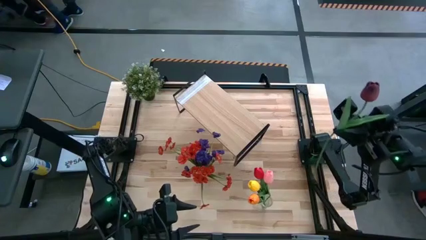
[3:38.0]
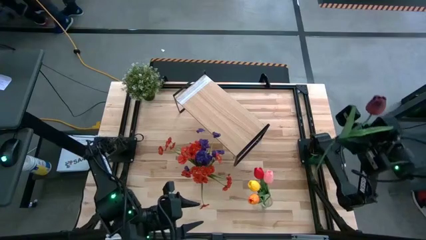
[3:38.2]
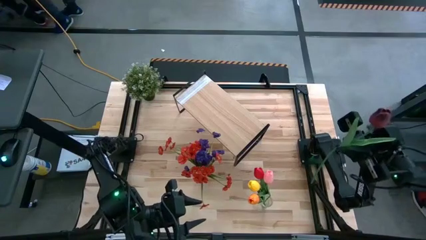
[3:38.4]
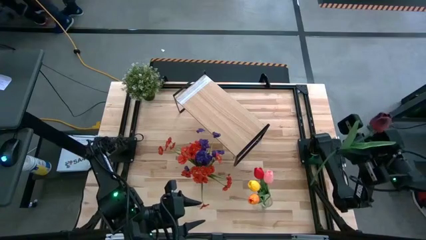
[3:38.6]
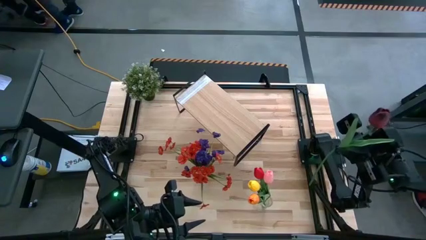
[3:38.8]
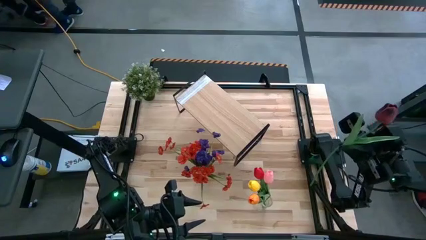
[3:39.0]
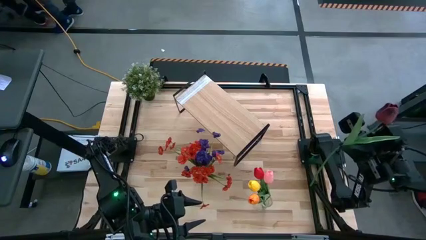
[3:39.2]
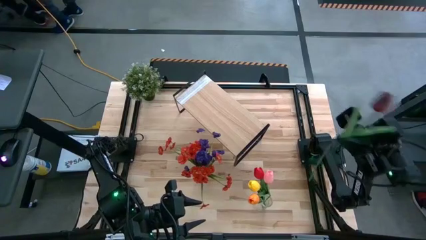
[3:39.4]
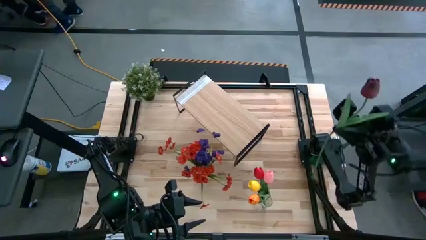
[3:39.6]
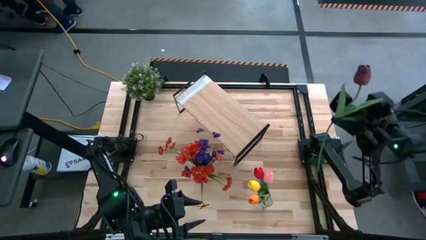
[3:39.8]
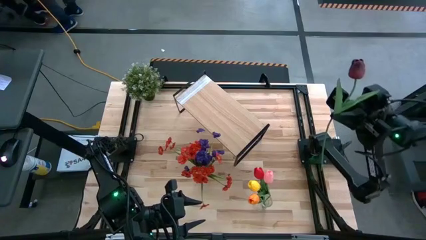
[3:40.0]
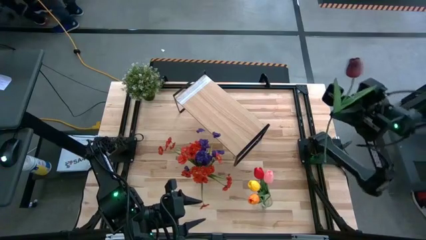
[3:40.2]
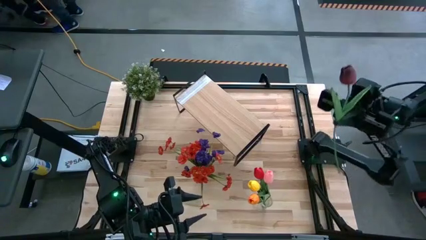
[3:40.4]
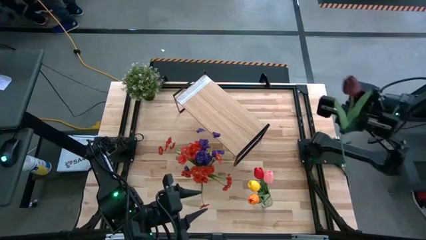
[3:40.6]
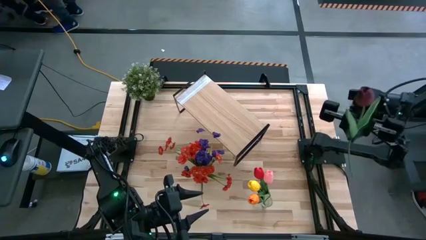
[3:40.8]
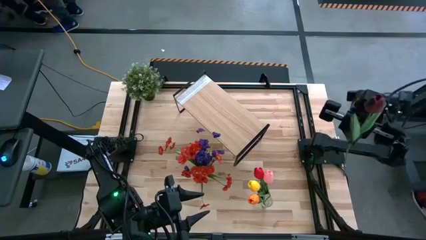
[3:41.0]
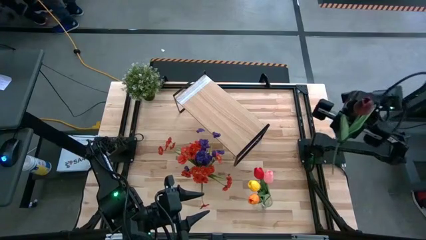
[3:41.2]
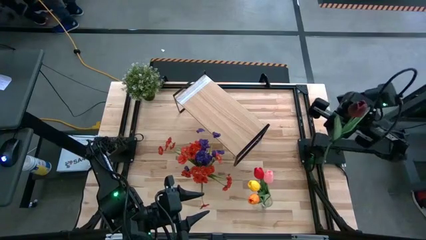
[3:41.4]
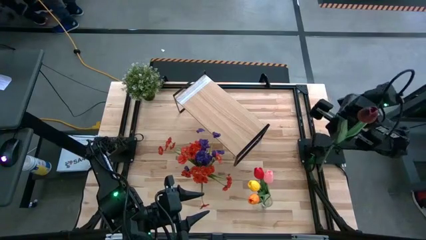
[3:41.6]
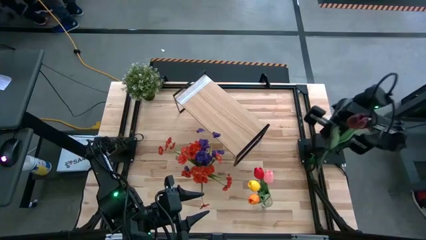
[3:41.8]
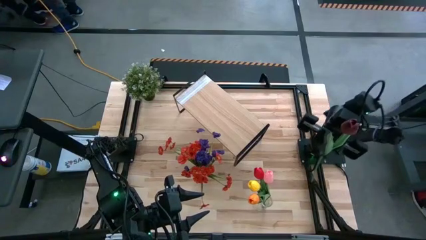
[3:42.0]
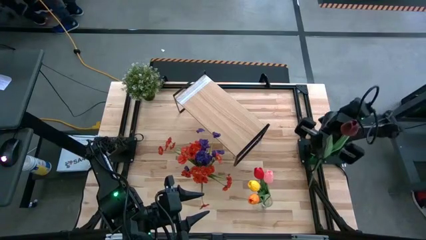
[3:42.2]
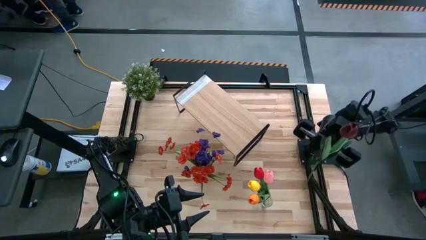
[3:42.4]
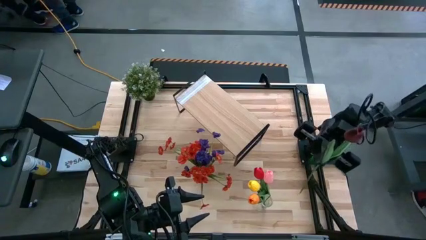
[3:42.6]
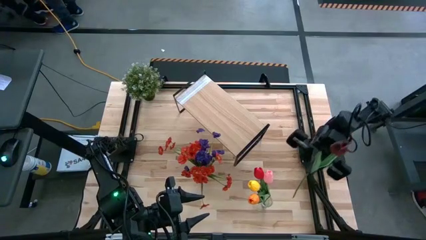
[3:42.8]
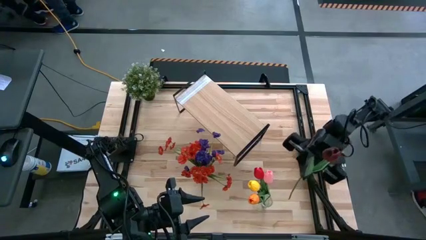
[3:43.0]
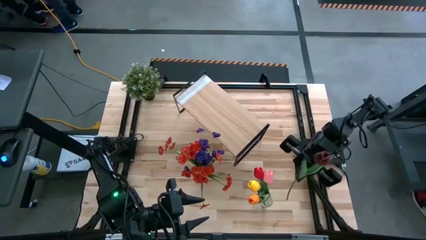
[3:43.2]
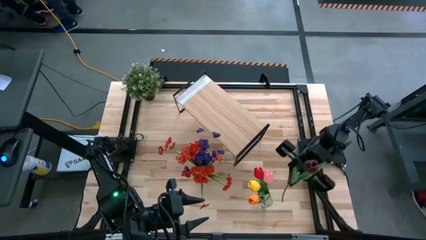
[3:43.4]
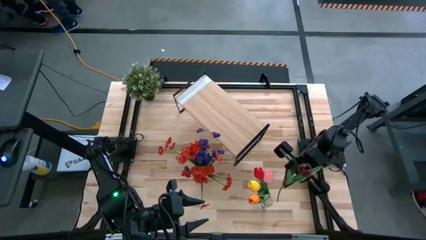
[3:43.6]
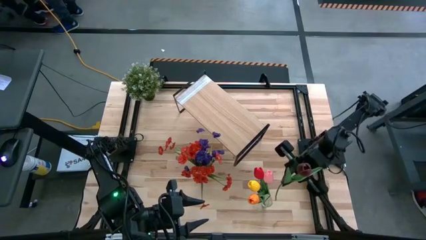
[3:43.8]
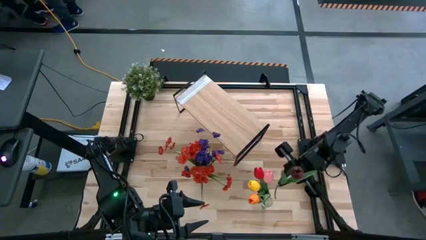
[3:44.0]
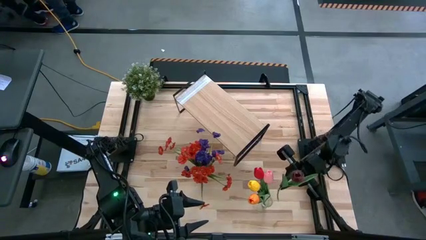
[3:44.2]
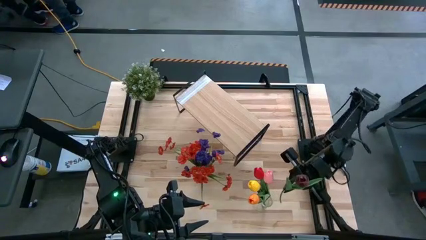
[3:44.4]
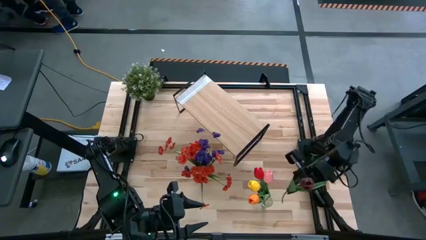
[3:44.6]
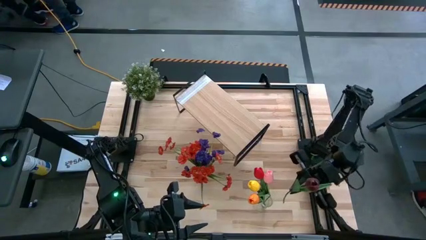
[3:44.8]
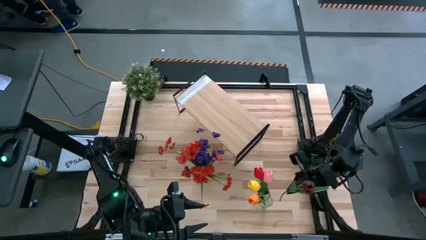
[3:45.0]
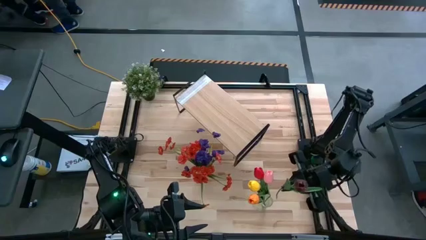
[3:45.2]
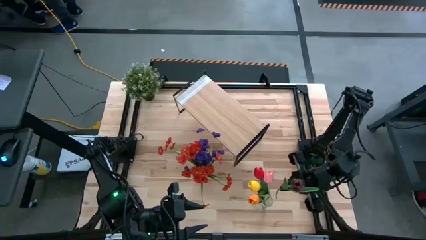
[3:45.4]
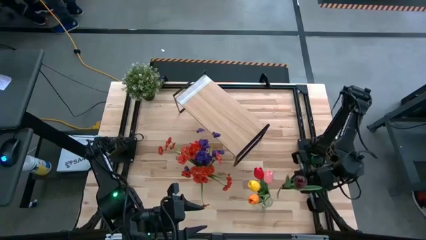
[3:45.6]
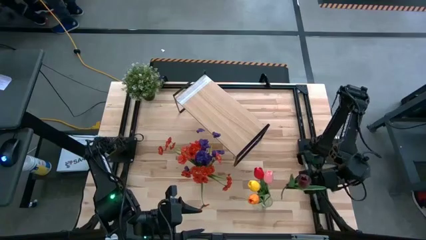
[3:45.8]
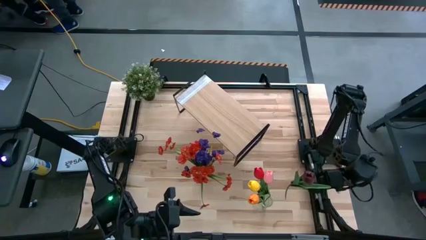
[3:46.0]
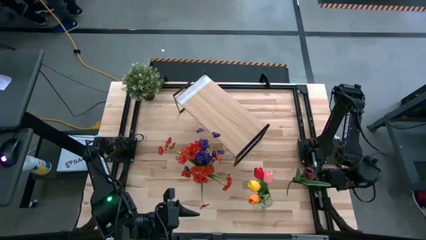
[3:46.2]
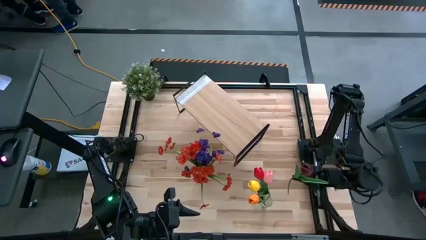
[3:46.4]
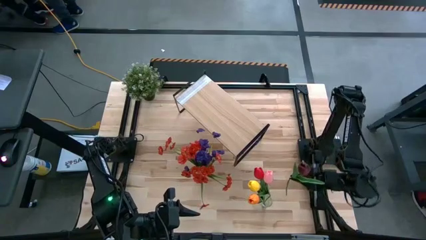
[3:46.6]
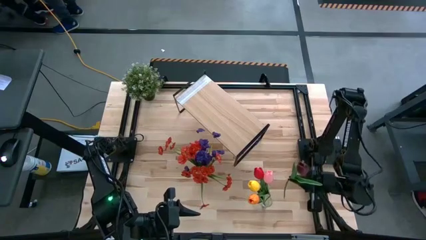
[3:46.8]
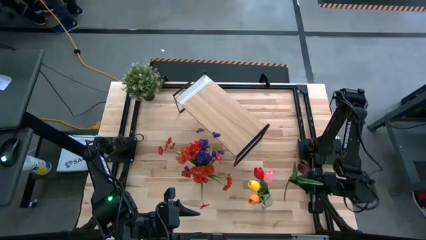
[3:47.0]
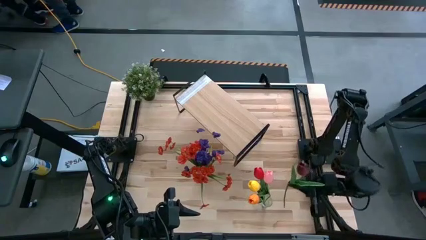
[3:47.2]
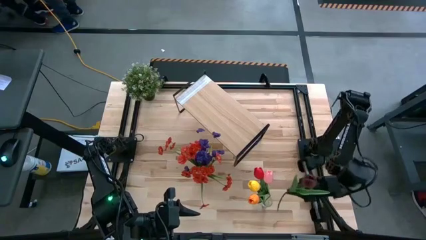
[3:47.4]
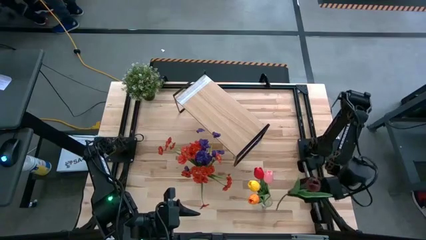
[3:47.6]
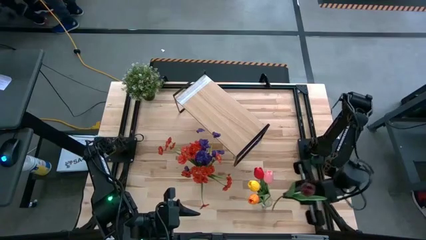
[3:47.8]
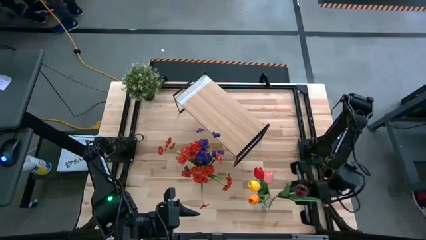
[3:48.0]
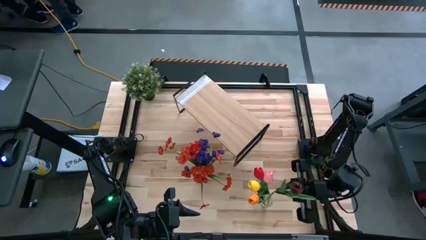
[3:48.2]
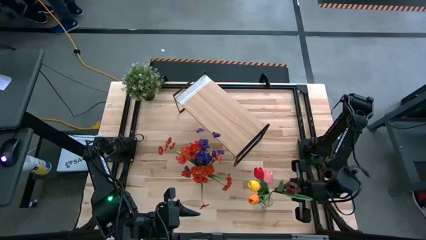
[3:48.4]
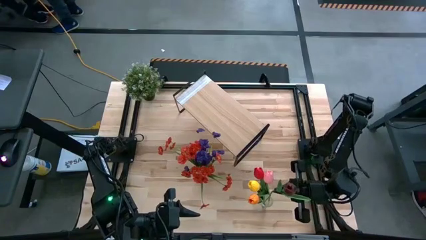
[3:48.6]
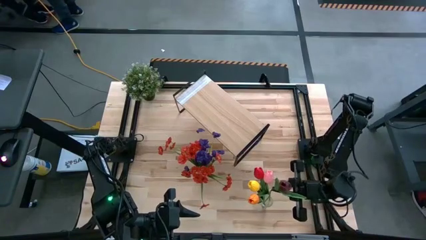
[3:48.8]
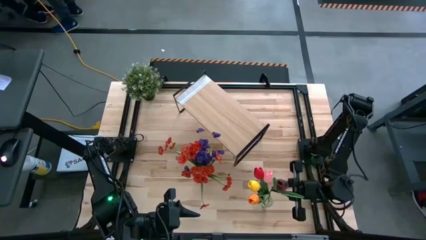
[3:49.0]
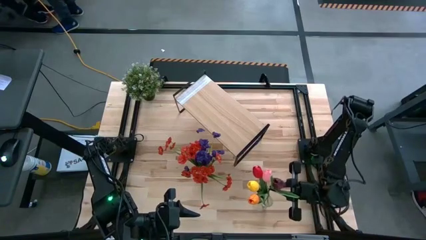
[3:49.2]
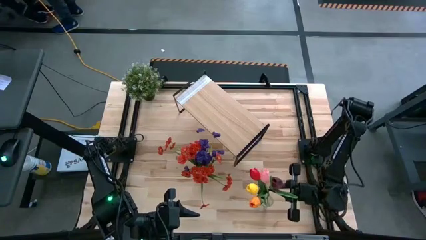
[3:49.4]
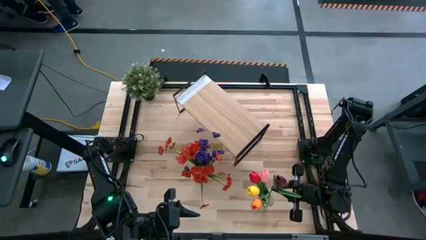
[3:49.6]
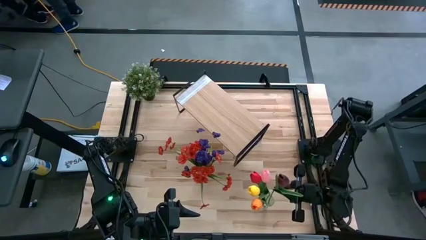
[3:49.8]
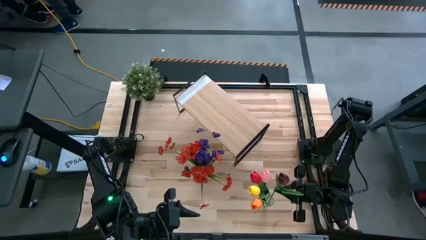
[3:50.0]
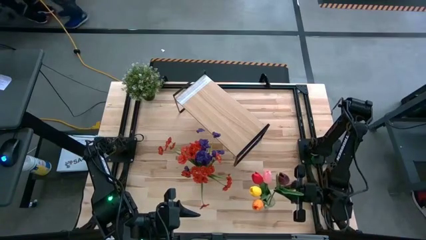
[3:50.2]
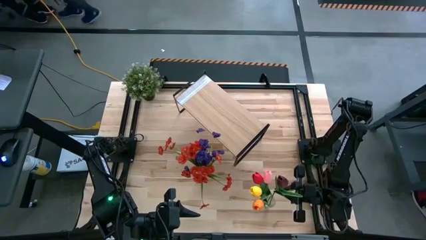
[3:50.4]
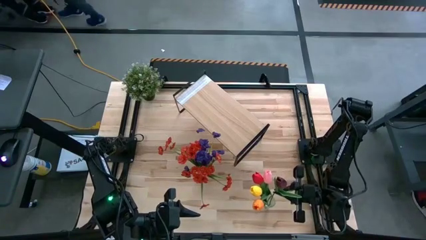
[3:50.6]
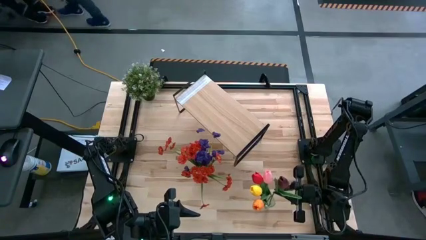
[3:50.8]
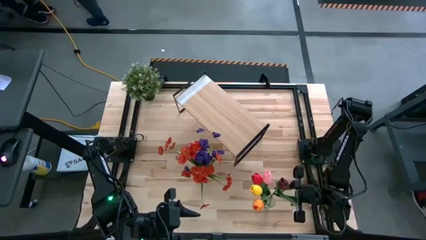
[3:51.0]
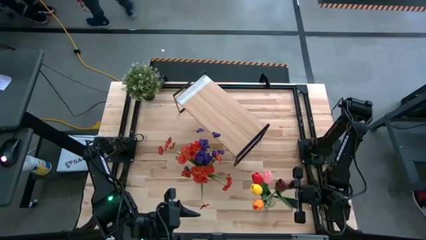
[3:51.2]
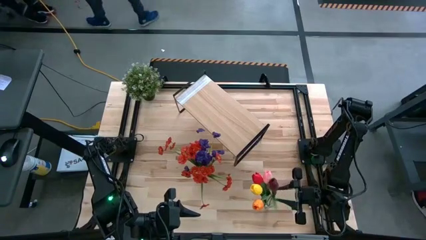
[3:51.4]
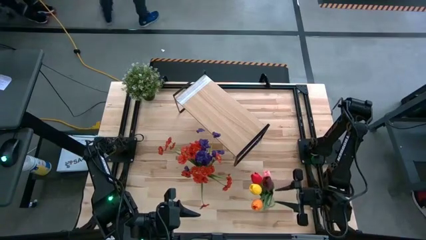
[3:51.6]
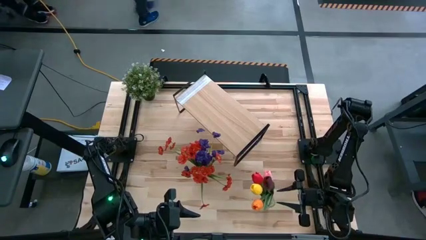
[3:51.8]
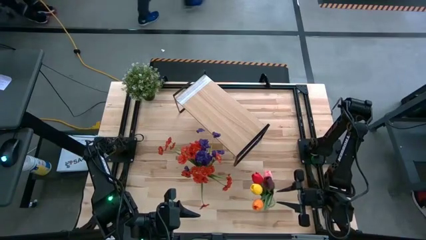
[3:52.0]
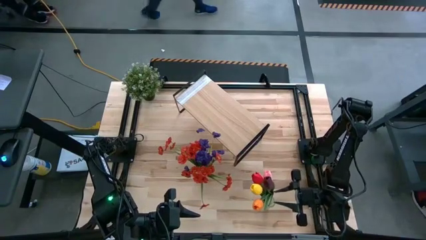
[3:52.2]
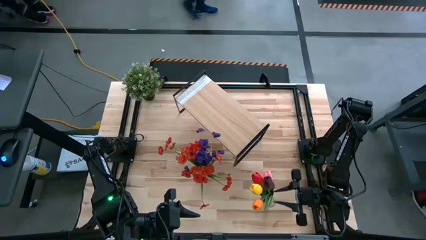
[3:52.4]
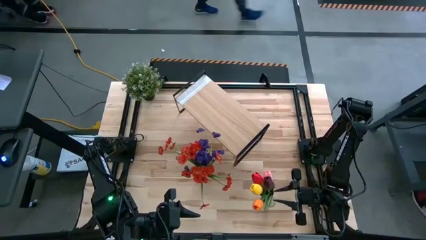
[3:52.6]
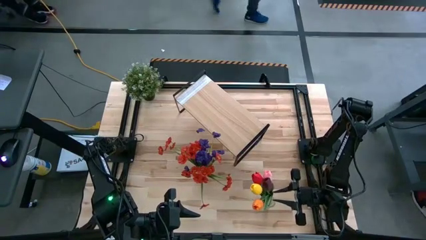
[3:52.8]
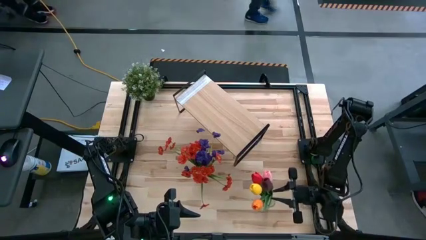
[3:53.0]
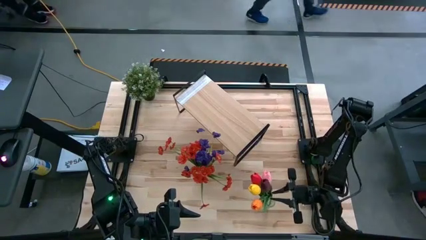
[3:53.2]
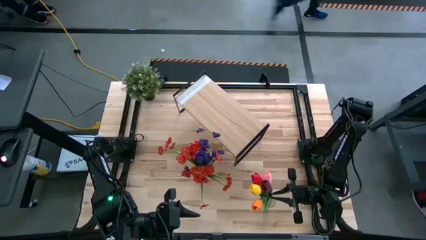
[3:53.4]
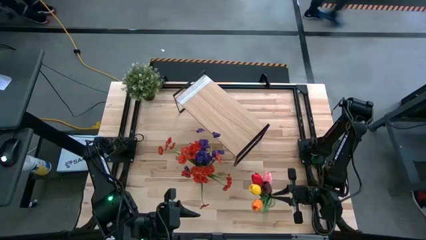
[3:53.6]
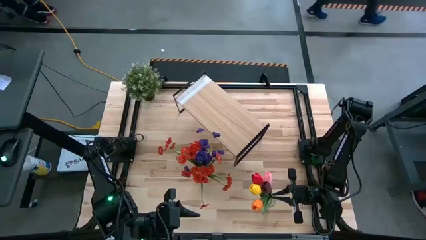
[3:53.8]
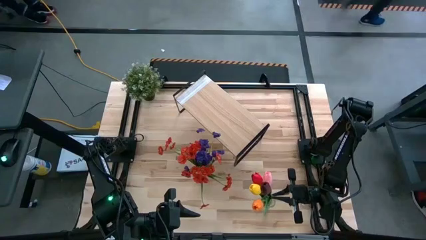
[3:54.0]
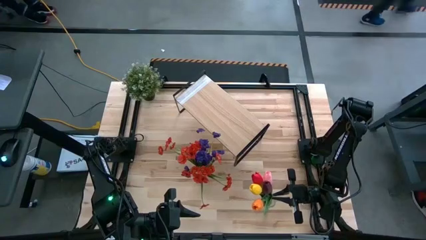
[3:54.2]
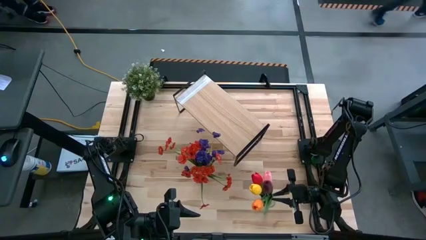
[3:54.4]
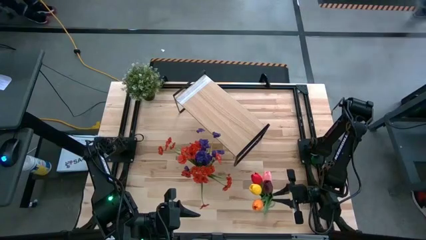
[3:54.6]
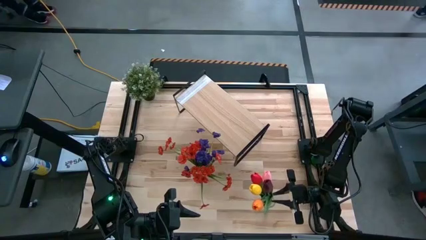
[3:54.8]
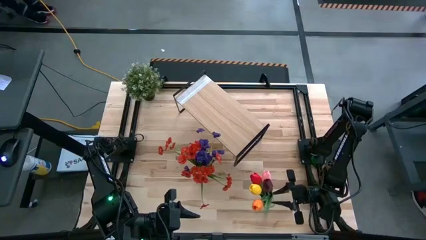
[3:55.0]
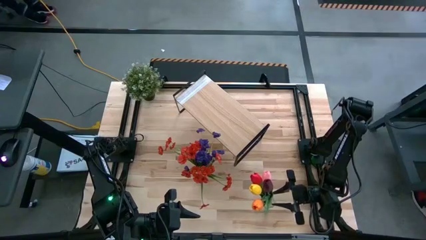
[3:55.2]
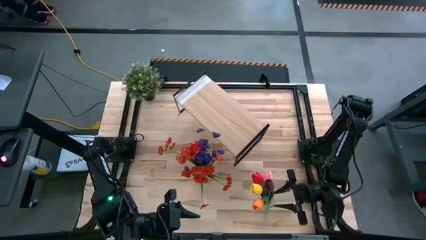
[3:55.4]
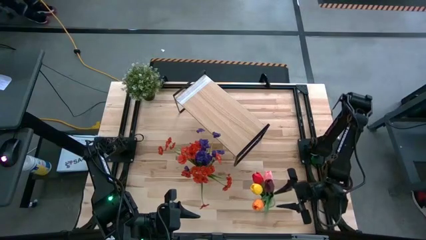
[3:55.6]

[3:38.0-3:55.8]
Task: Pick and place flowers into a vace then onto a shelf
Put the dark red tulip into the right transparent vase
